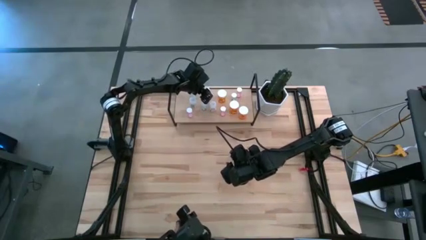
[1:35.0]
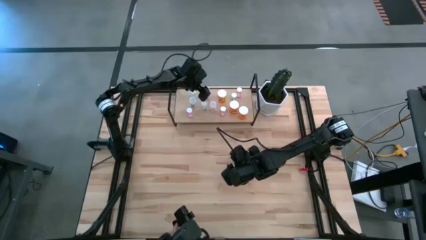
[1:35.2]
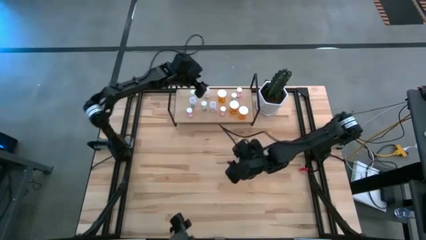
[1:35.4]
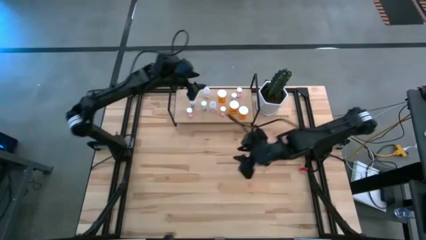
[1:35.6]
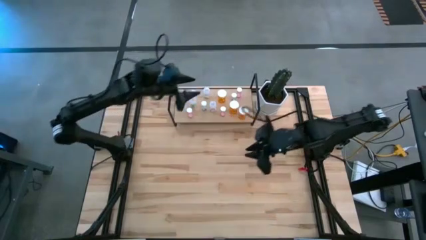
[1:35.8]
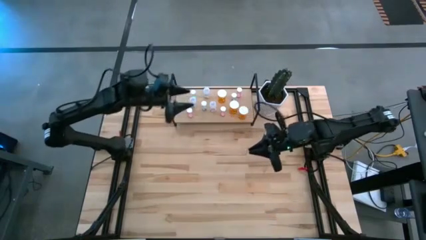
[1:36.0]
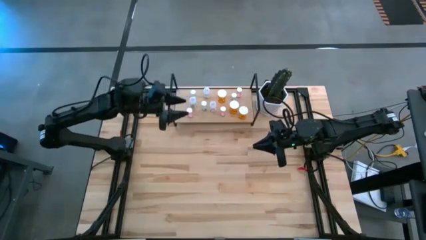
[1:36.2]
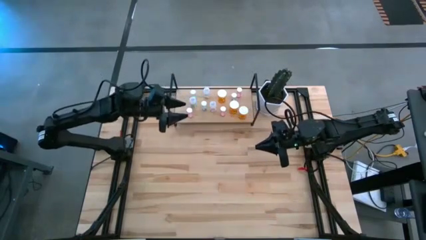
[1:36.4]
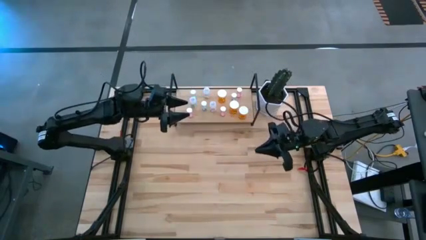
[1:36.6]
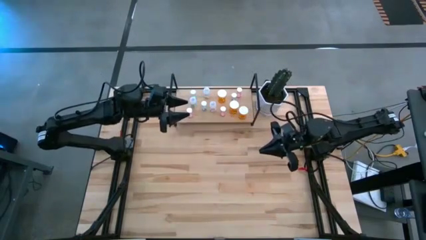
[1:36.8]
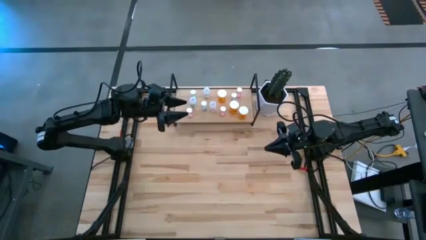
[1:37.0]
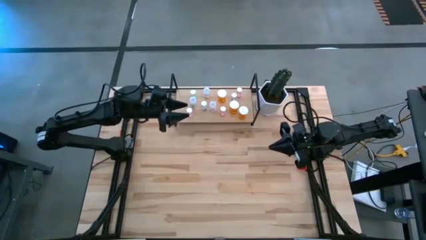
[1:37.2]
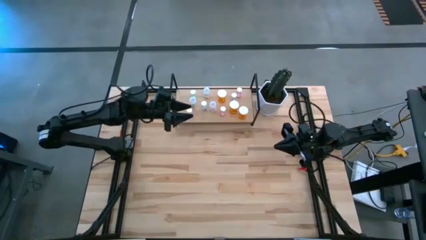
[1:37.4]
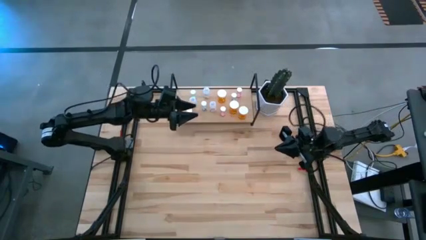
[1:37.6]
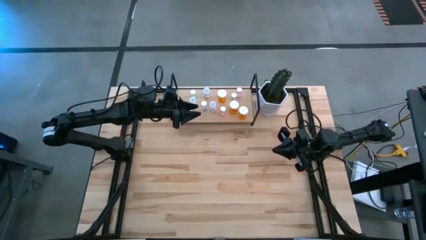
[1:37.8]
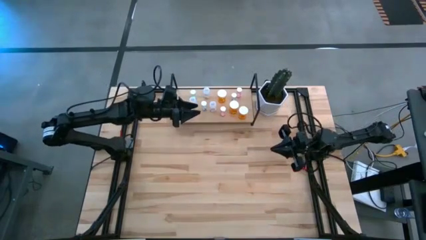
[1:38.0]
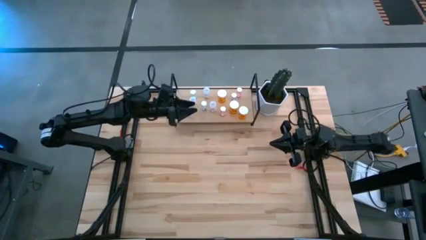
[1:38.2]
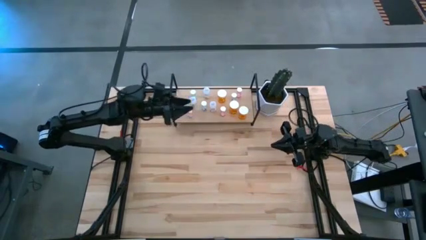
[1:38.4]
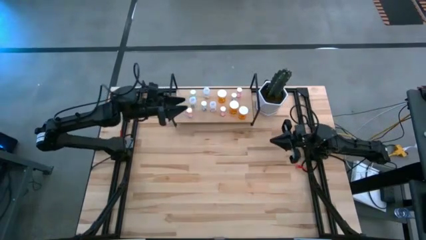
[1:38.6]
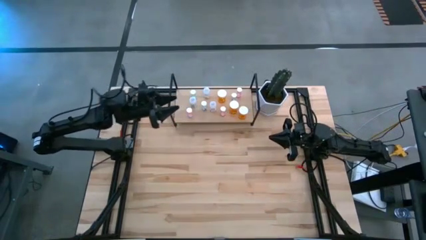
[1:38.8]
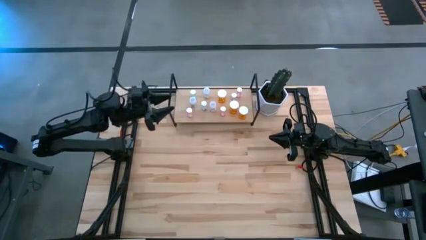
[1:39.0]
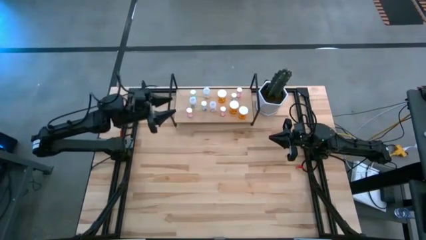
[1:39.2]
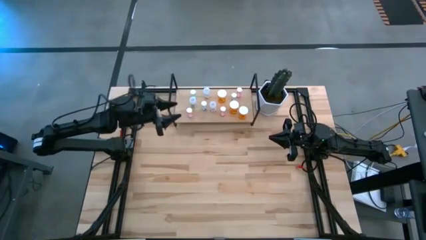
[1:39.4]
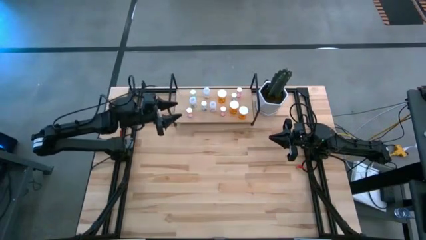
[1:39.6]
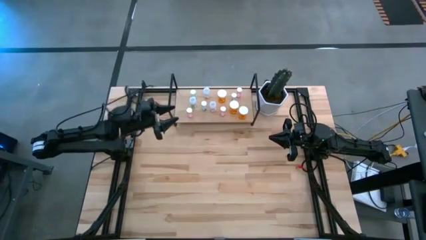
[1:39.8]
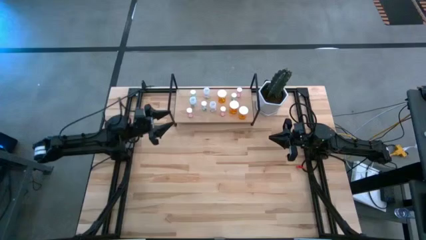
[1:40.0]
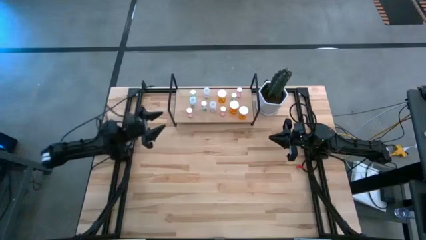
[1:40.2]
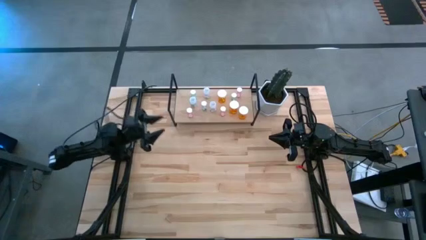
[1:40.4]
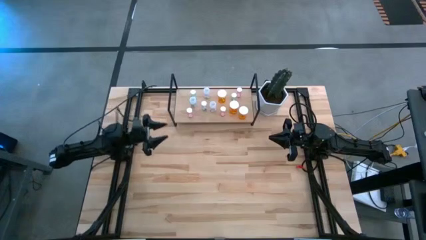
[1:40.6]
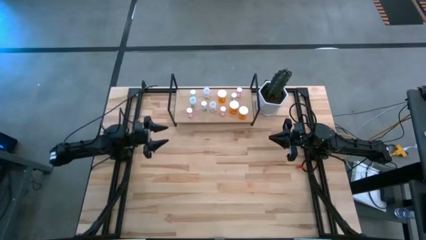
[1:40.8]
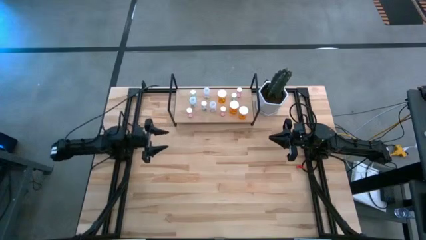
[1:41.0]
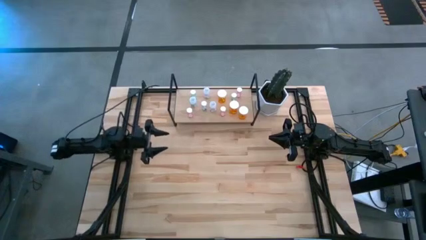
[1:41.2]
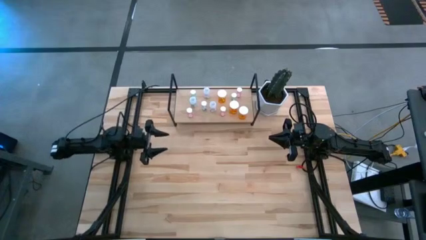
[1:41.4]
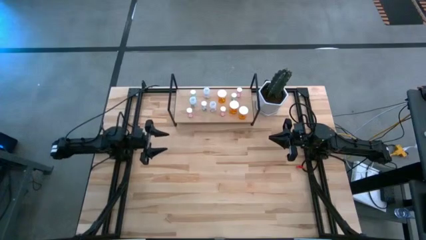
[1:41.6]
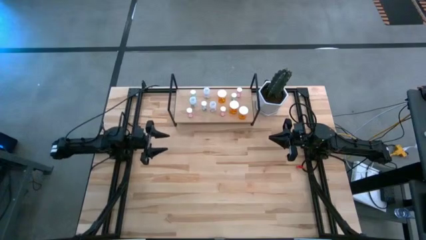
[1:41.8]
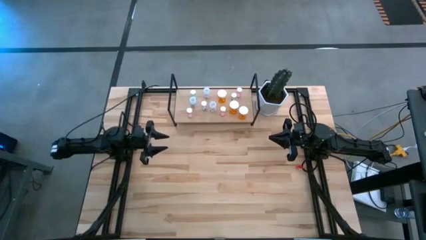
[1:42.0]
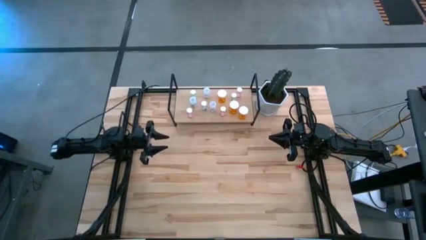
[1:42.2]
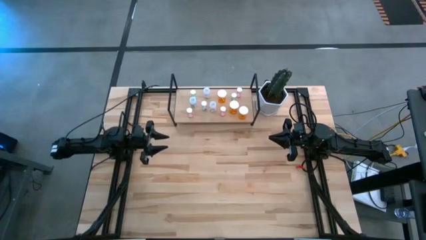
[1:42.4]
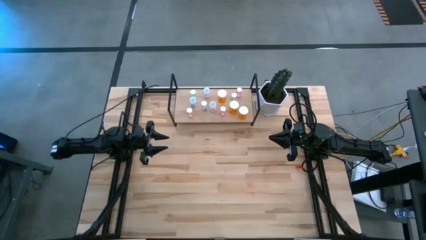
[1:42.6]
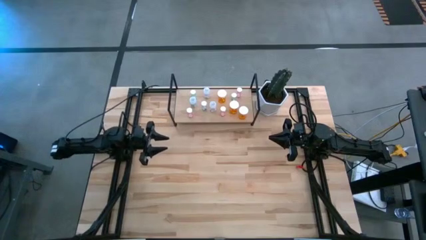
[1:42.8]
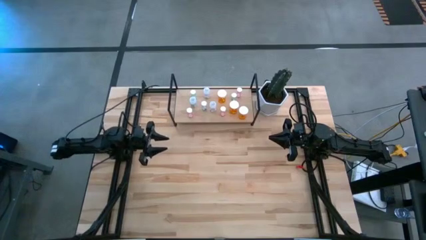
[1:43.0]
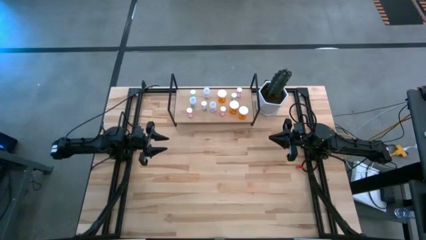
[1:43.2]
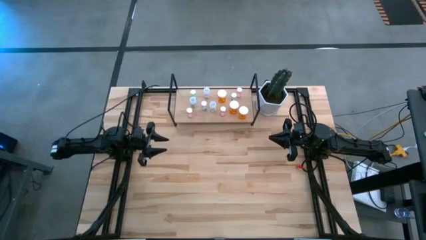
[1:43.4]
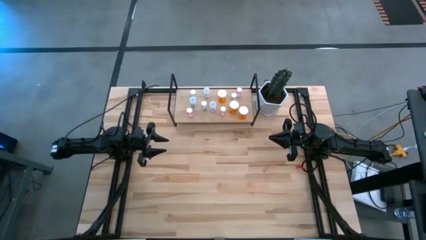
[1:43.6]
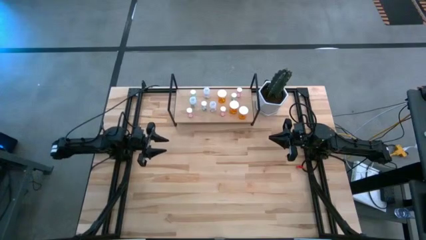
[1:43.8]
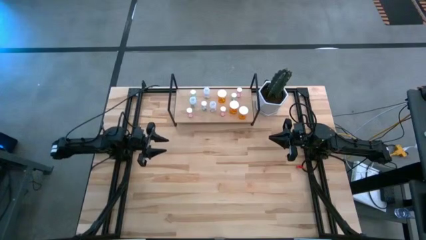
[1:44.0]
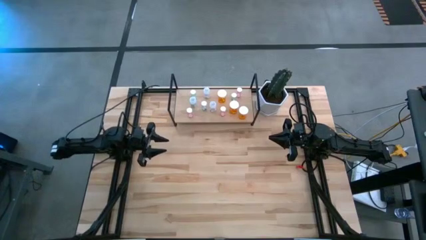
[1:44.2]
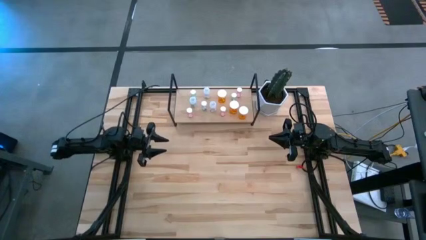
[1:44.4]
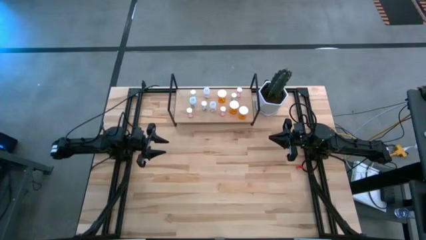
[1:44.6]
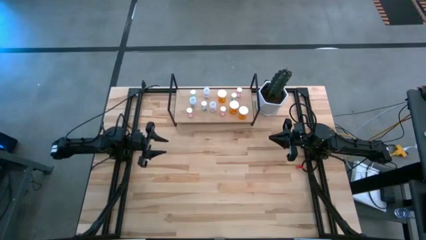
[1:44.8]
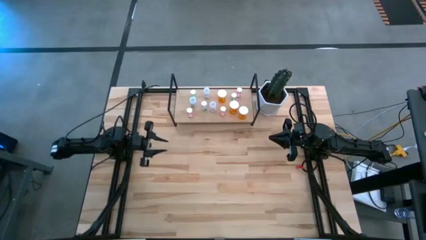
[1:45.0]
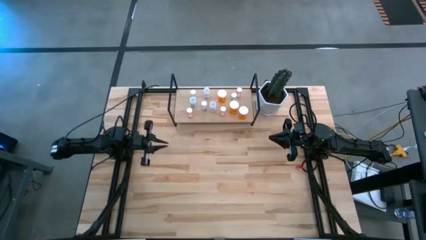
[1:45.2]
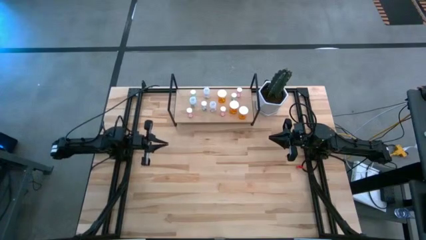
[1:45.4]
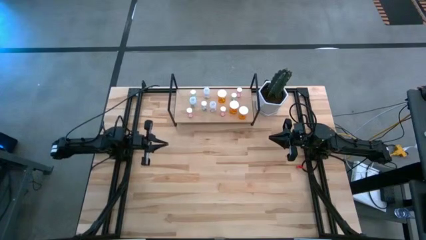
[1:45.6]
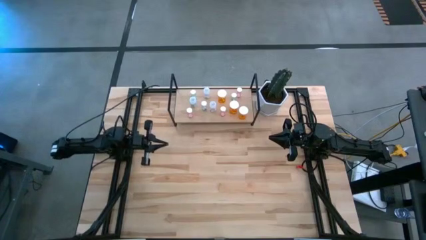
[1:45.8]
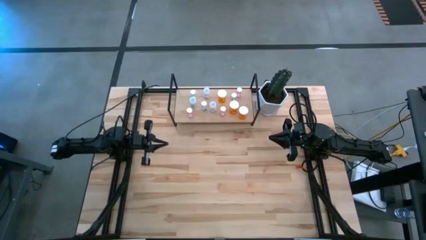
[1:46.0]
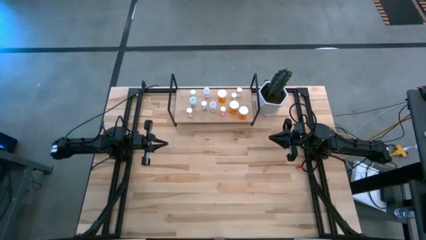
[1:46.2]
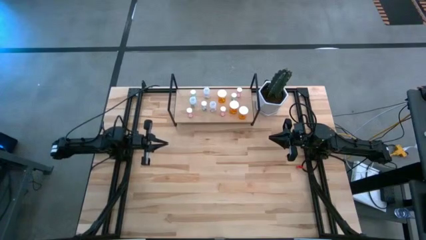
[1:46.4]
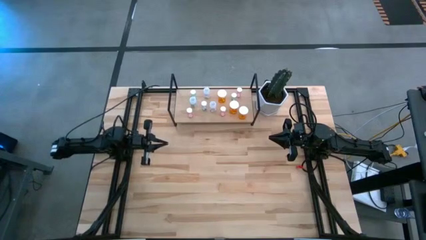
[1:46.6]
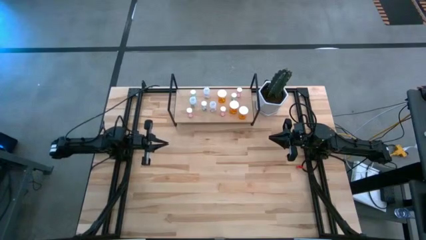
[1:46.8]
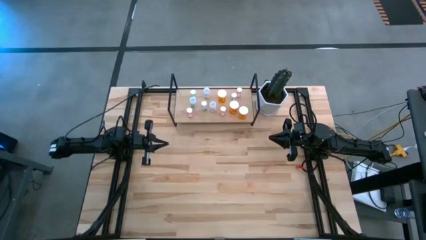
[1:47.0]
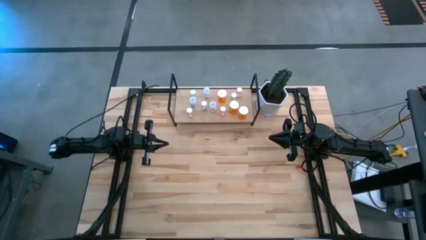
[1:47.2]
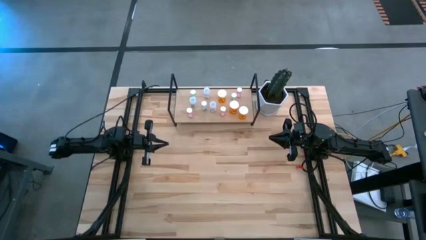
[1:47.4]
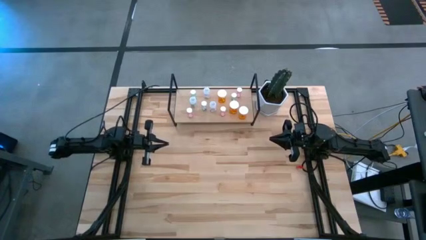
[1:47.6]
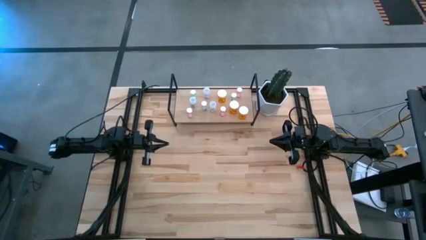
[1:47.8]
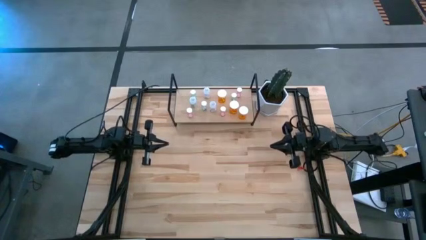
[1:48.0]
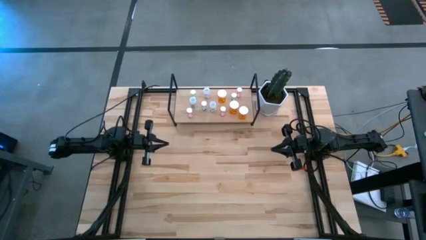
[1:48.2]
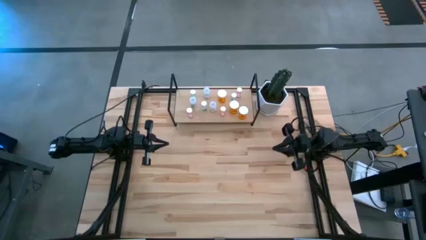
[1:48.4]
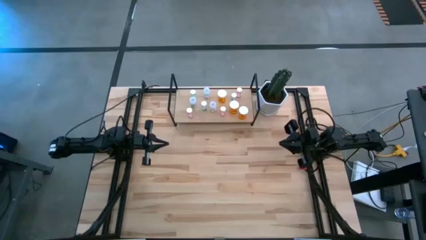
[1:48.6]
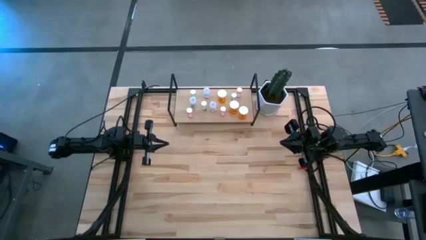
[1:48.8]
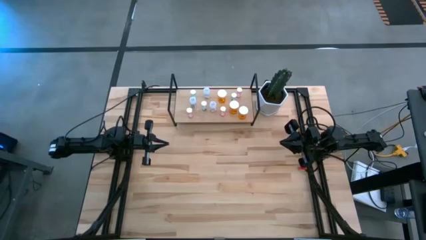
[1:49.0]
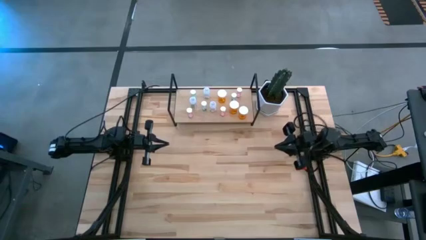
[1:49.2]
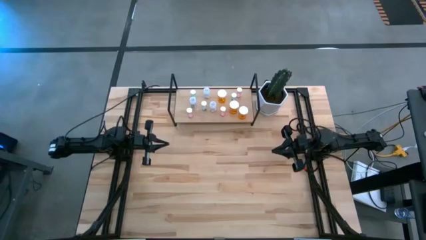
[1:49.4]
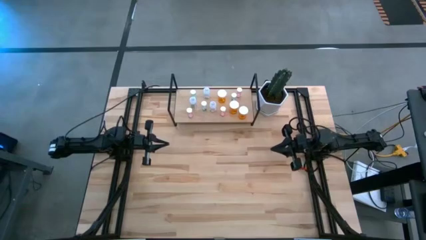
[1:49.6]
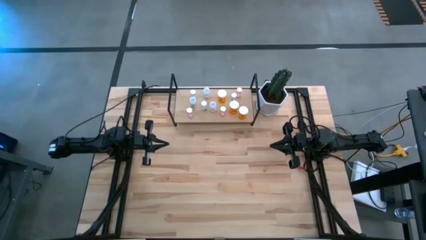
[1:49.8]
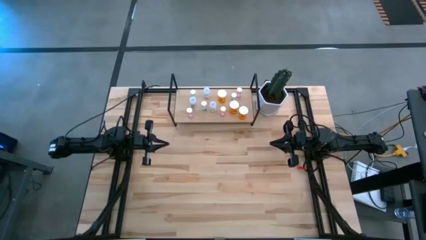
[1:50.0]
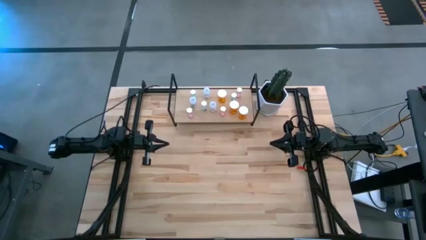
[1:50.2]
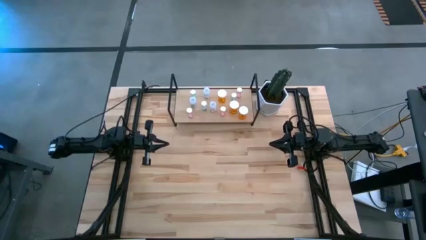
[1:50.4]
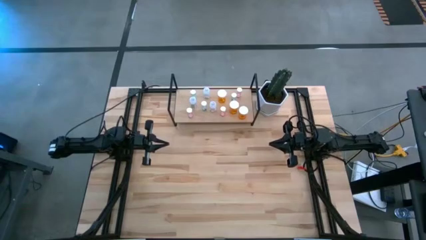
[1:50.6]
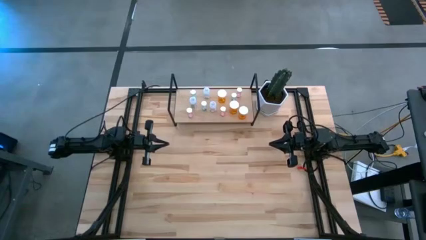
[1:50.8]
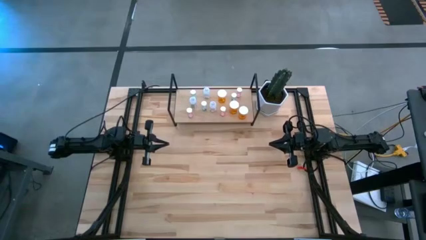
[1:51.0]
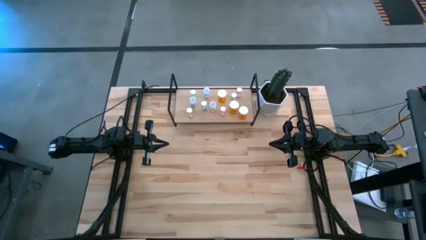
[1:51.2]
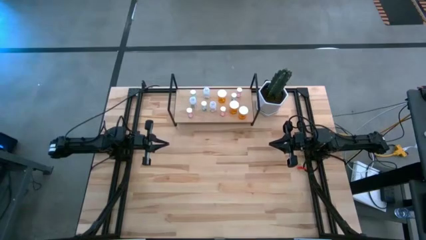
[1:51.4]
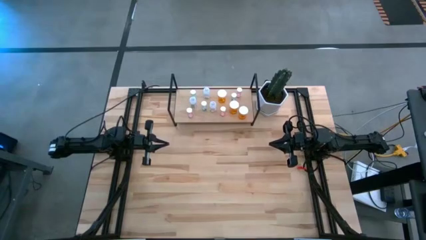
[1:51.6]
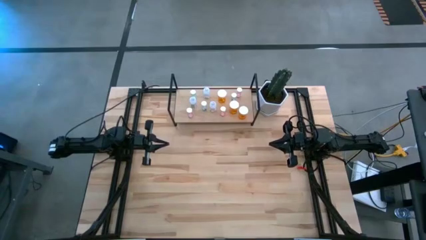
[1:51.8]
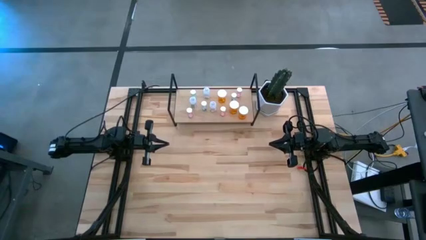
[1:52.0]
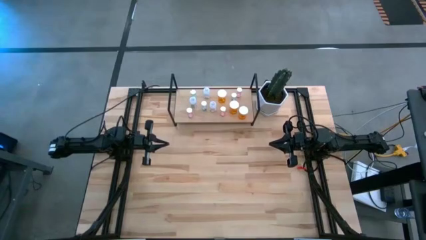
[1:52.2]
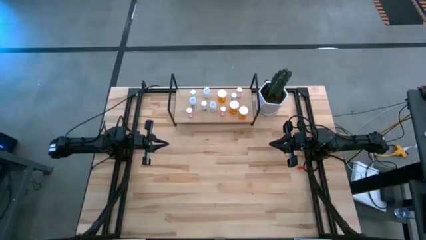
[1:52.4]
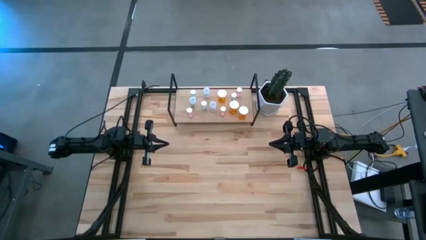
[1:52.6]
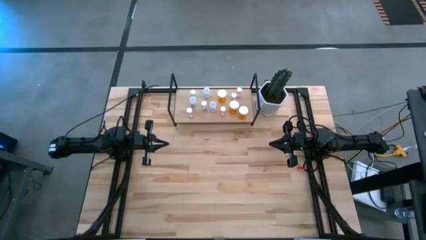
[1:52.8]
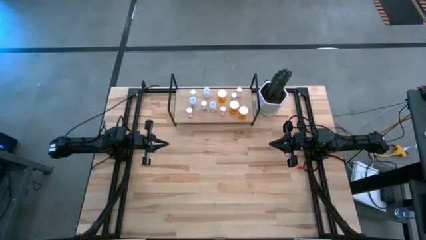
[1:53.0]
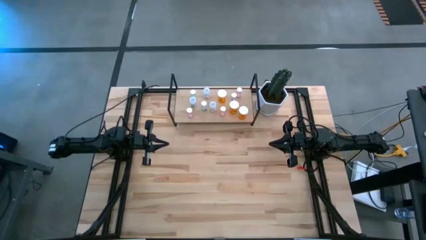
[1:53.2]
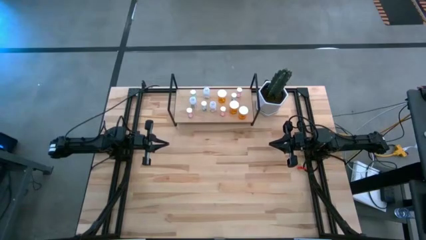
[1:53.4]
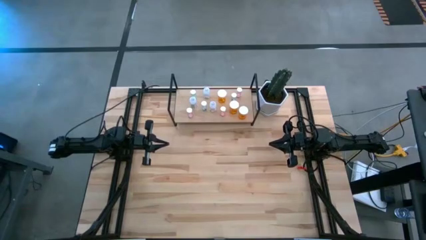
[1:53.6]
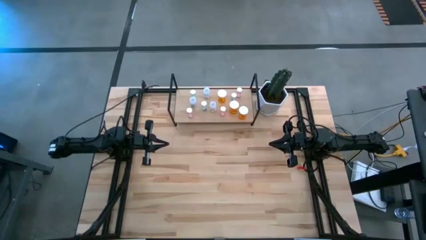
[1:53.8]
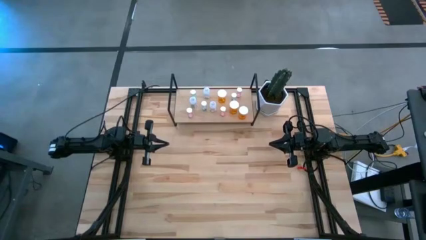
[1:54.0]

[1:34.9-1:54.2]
Task: Pick and place medicine bottles onto shelf by color
Return to Home Position
